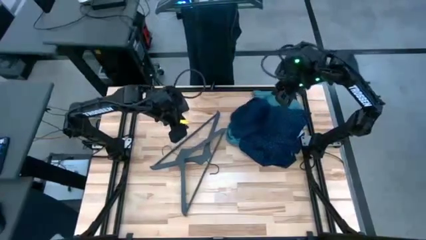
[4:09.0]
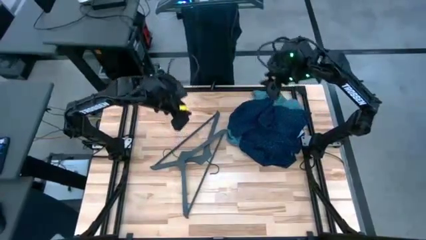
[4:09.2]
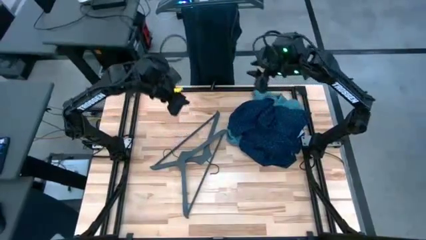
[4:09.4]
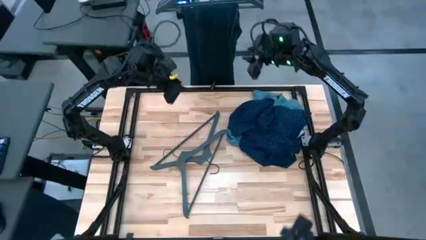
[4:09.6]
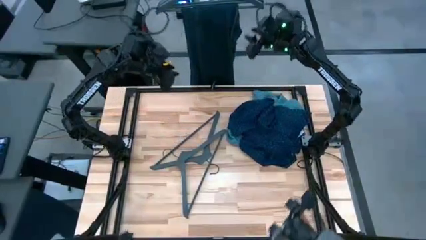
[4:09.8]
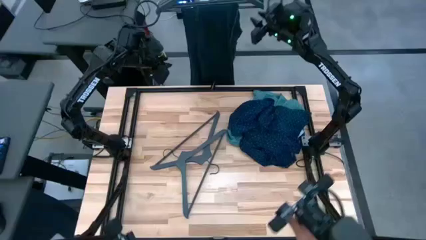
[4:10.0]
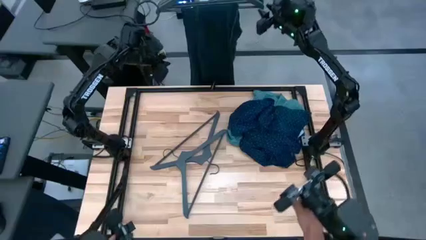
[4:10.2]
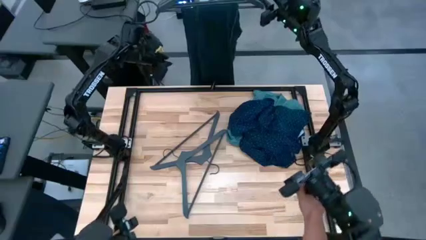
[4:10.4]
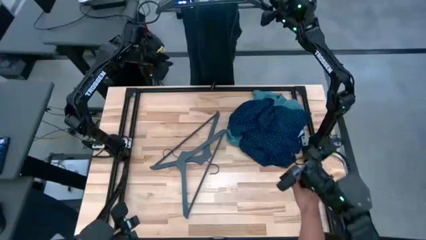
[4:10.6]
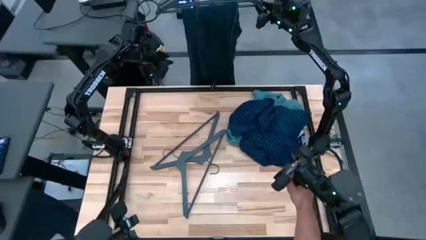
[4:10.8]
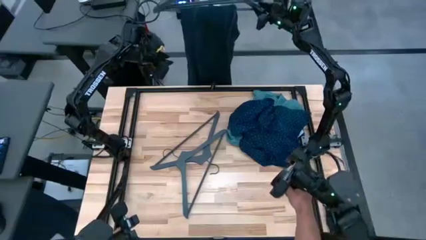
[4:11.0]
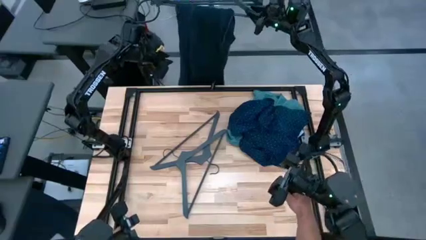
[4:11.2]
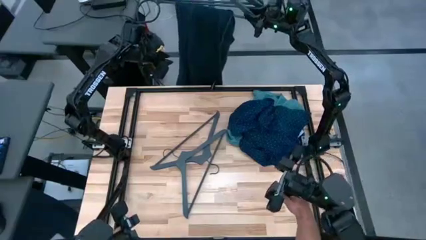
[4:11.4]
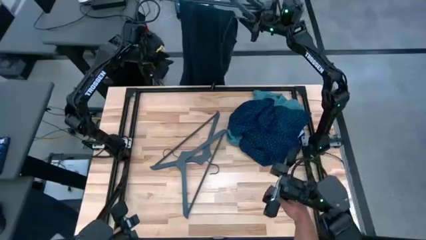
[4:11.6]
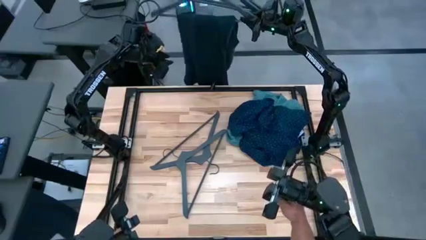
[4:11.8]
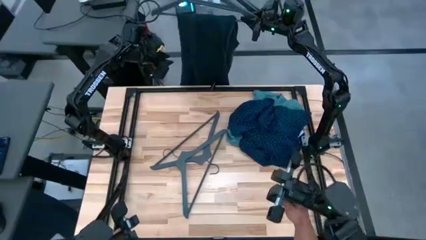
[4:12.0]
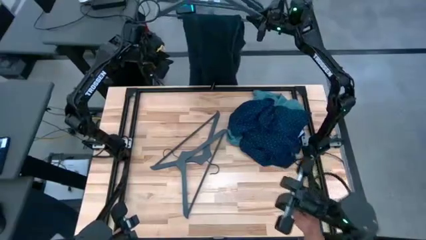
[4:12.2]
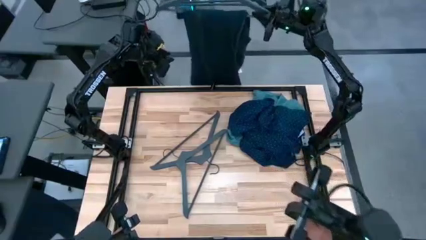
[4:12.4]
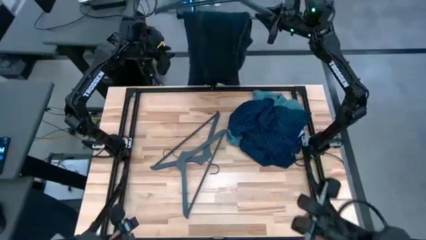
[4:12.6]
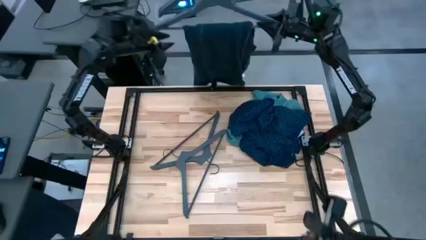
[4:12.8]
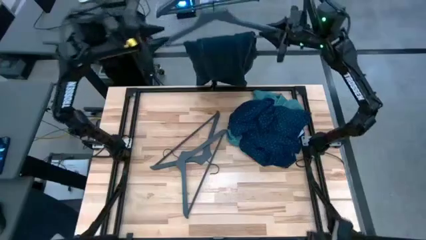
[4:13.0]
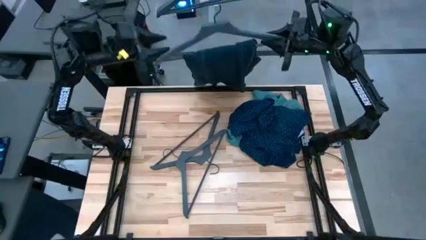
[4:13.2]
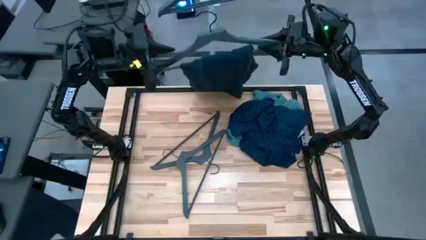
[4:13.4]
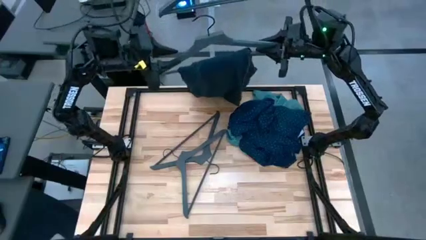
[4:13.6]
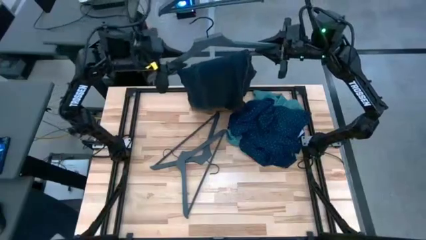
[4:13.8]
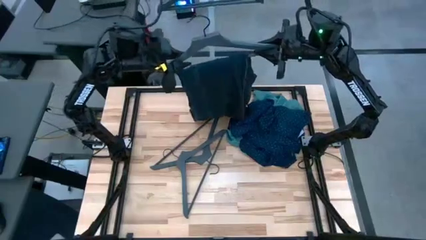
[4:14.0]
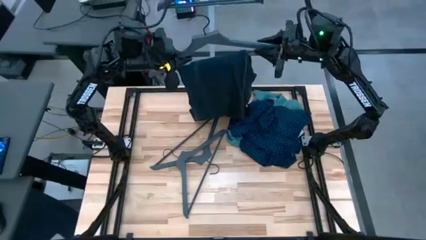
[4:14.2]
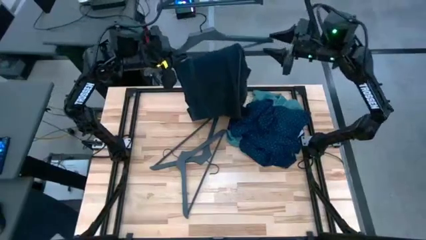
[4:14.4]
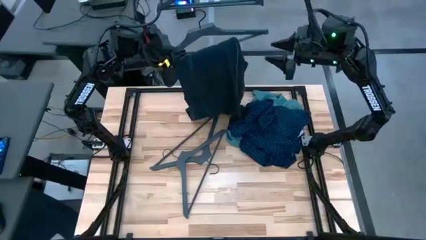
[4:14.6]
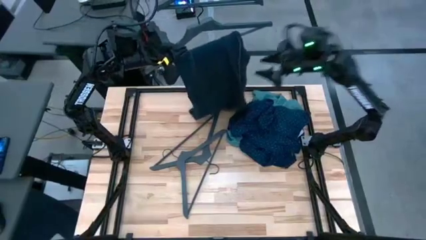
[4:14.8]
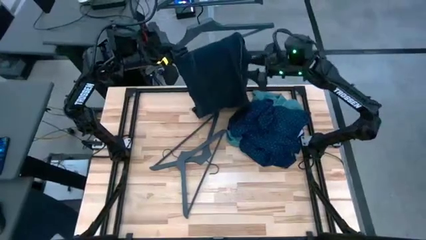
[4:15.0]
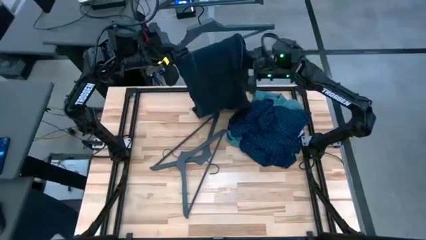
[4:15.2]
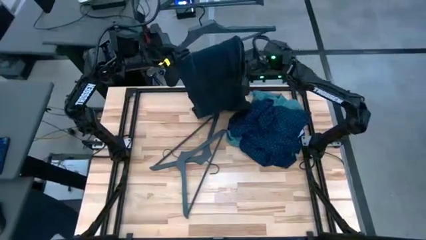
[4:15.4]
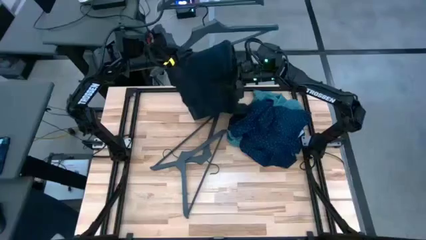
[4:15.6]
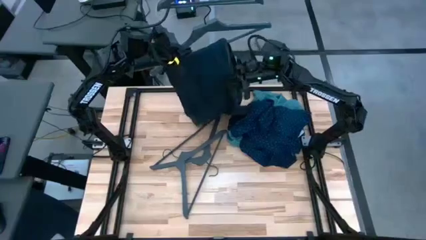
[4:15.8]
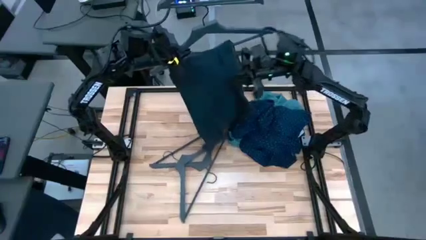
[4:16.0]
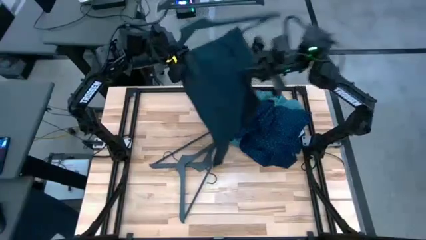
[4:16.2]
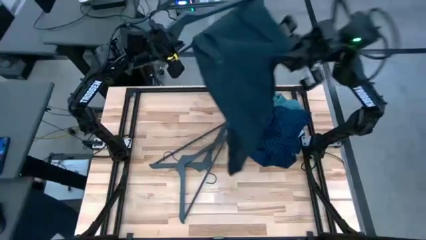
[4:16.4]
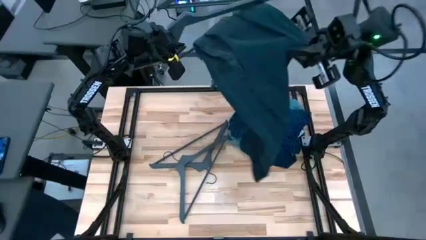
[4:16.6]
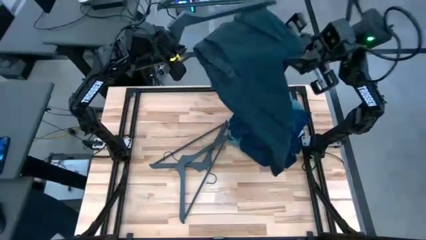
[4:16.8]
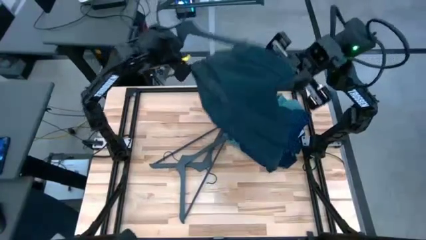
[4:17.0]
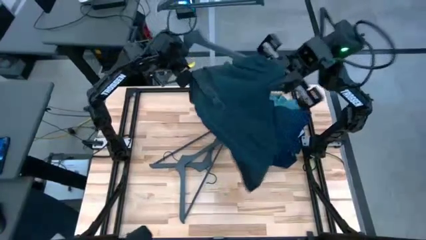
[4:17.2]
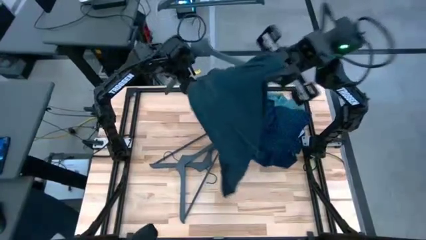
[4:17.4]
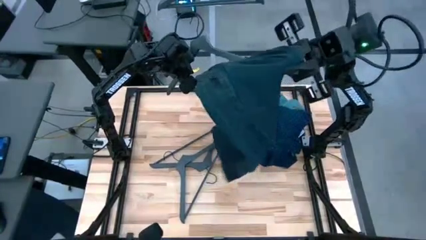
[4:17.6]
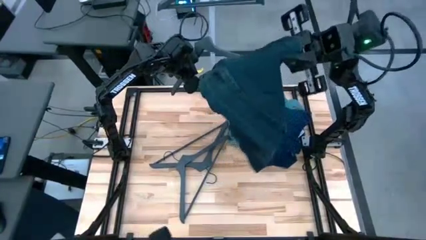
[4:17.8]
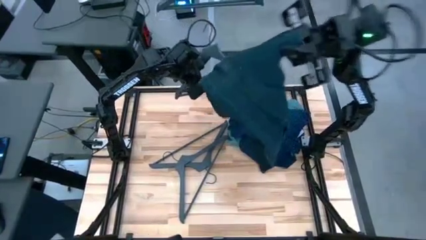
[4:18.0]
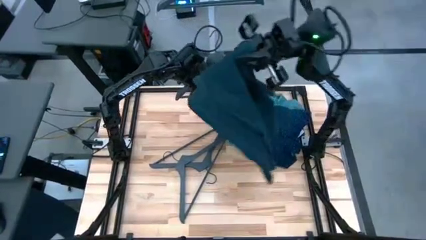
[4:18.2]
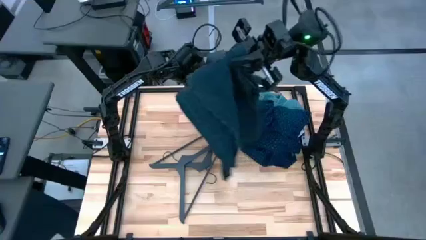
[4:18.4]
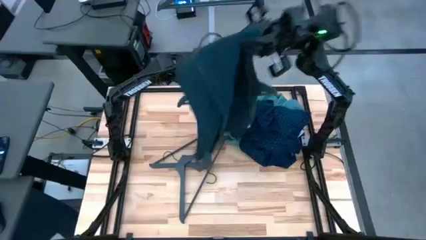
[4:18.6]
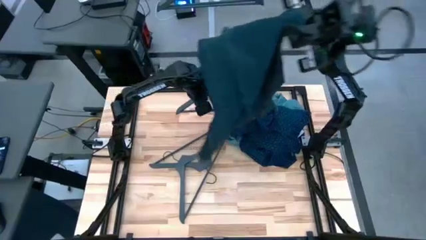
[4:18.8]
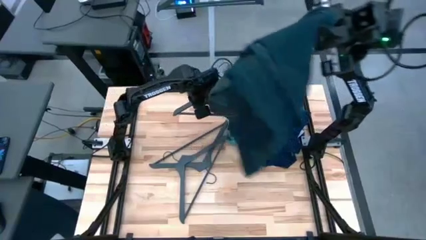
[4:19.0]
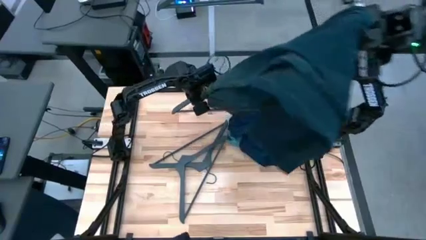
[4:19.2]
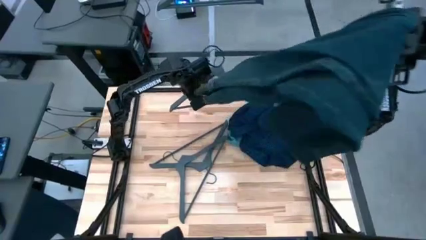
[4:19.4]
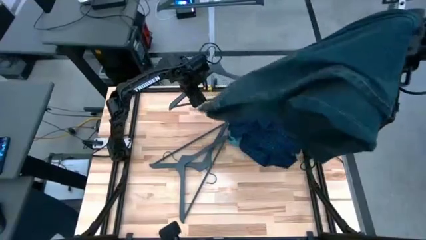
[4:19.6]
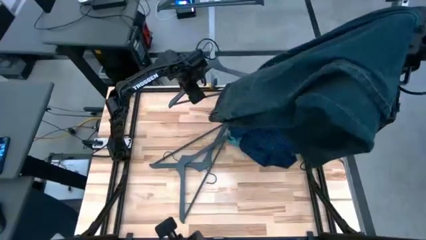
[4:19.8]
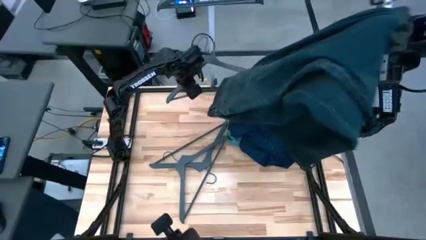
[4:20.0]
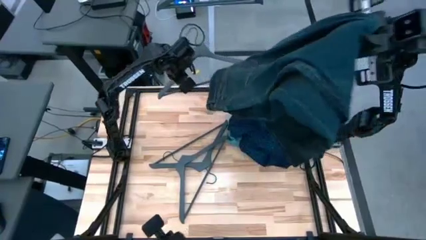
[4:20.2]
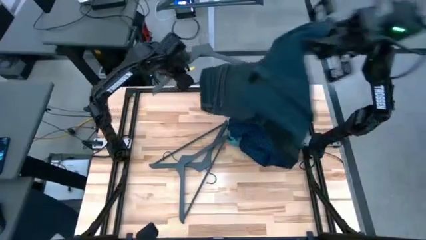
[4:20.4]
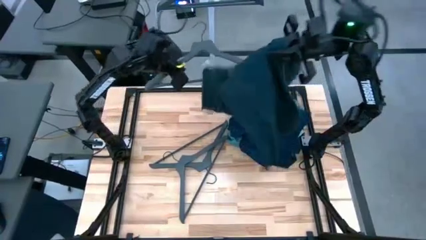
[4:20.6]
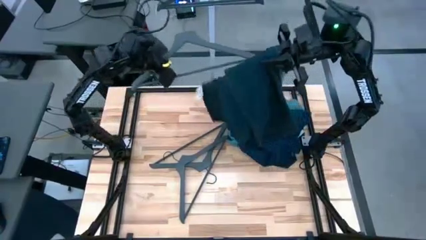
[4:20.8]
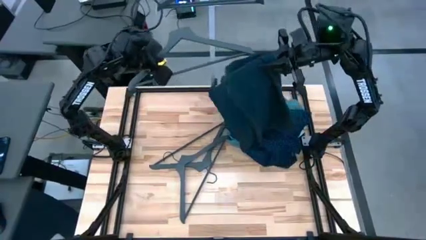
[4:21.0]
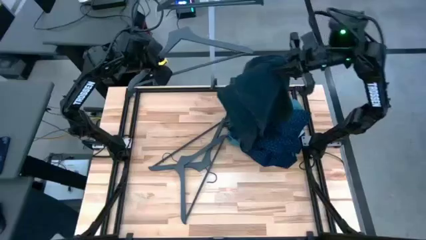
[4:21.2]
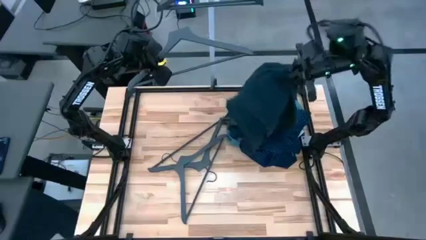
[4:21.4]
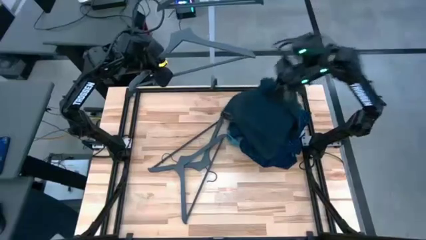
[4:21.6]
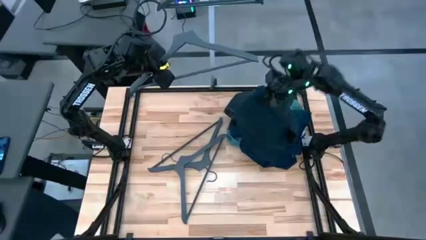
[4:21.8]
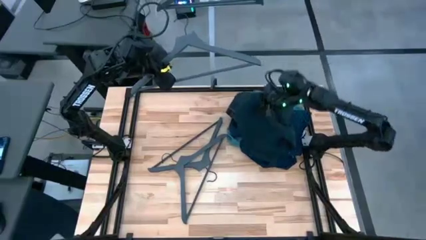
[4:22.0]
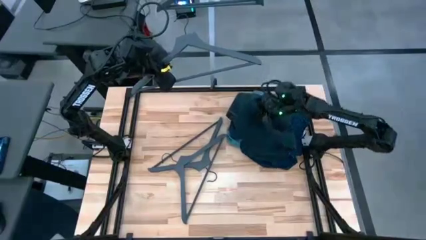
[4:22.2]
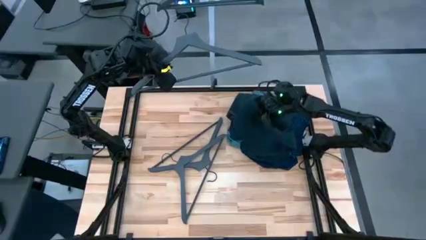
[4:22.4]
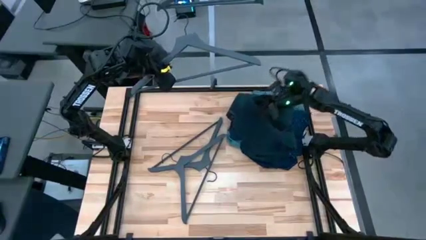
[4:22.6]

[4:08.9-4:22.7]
Task: Hang clothes
Unhang the black pants from the rack

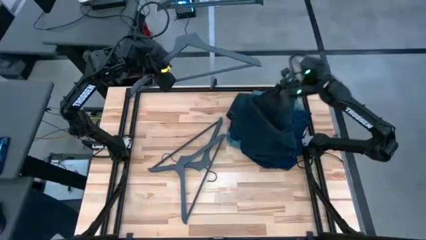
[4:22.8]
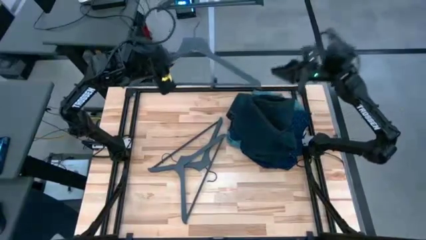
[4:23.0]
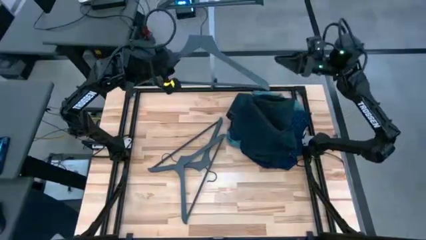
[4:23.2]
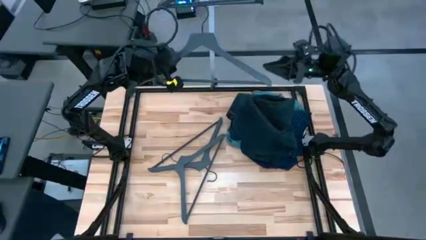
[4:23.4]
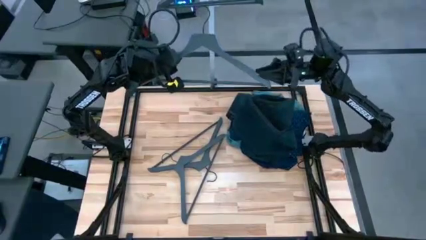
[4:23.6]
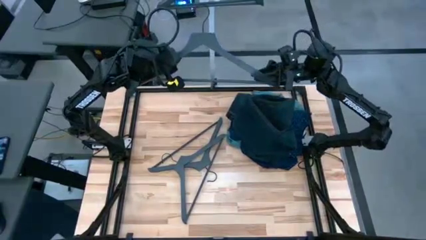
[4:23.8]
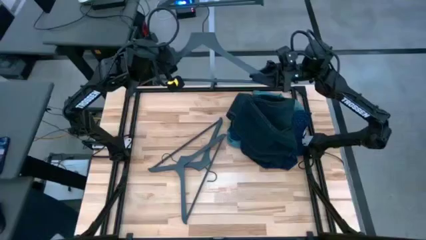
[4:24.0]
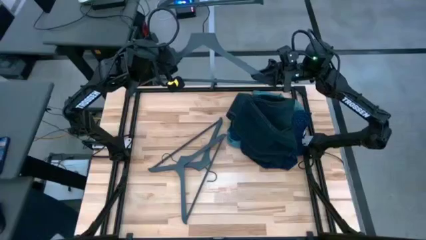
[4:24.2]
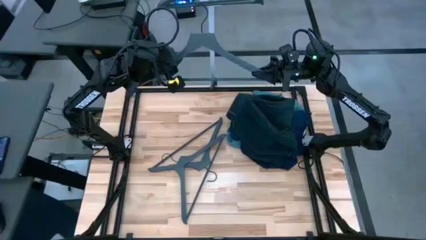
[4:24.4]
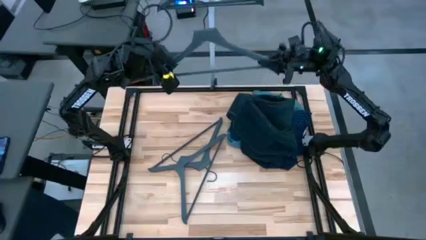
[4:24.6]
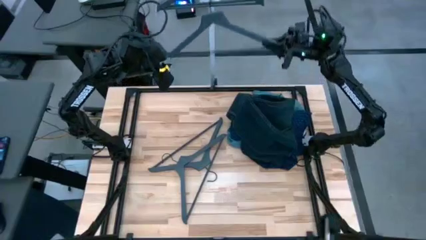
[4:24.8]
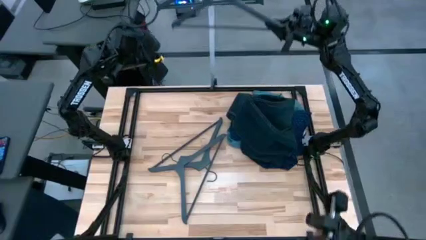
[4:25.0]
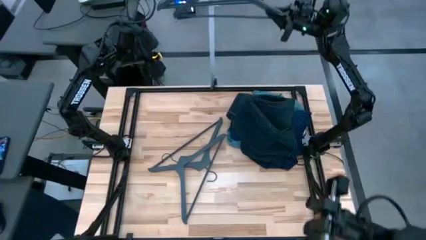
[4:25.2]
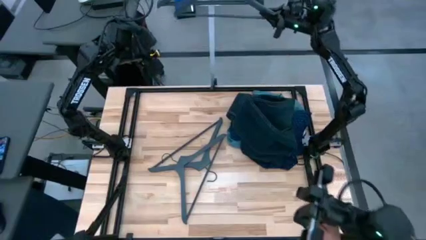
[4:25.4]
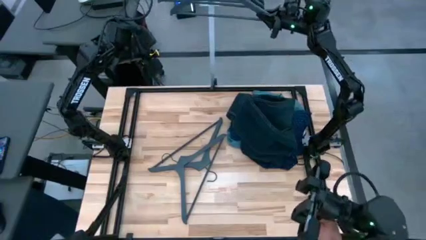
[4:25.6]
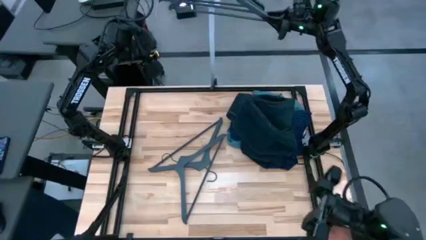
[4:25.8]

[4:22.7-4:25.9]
Hang the gray hanger on the rack
